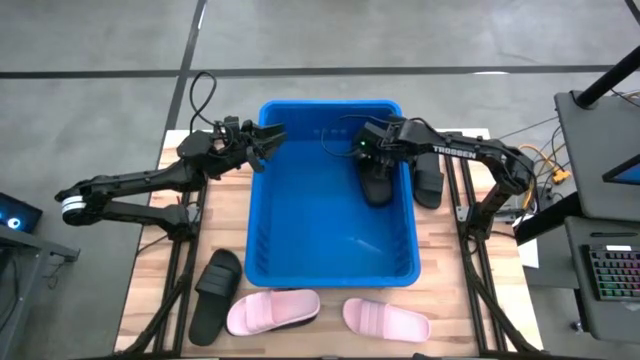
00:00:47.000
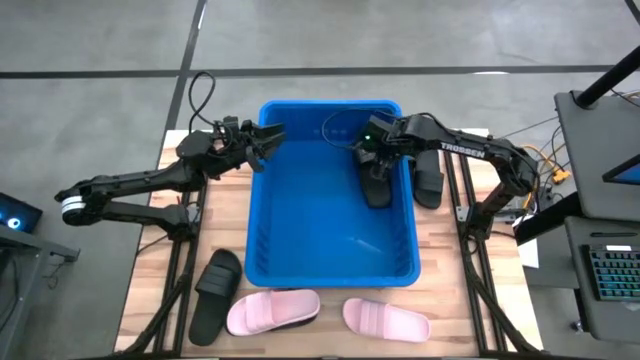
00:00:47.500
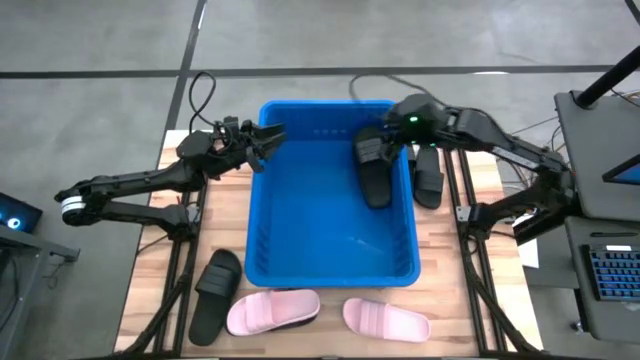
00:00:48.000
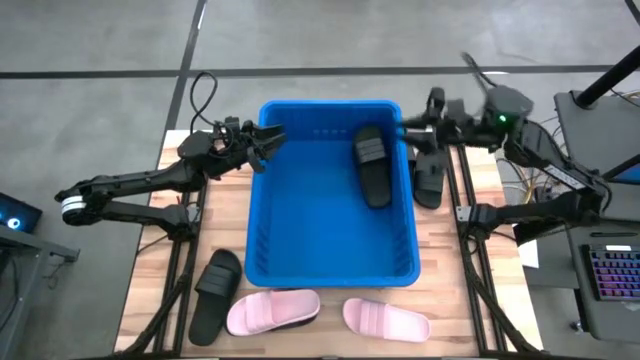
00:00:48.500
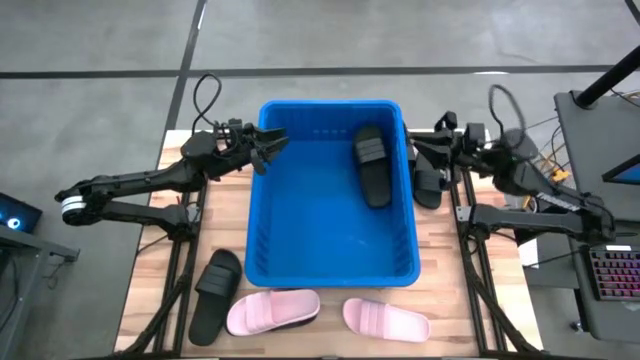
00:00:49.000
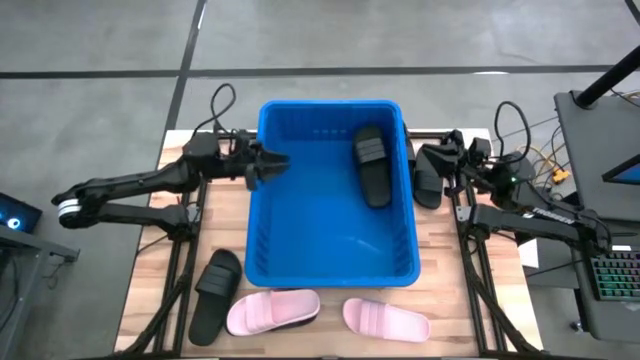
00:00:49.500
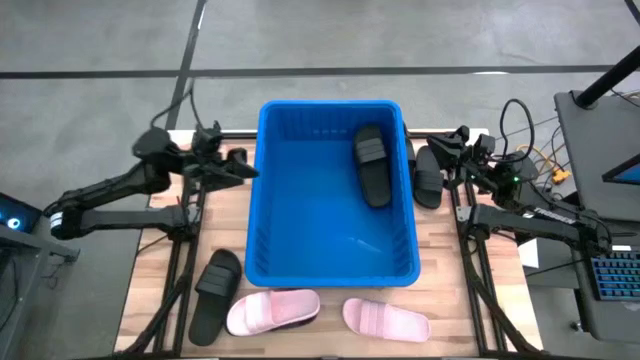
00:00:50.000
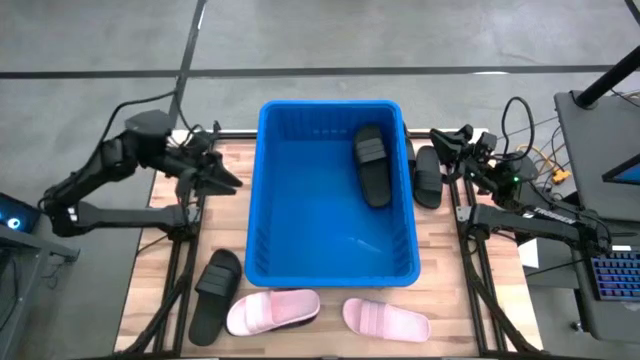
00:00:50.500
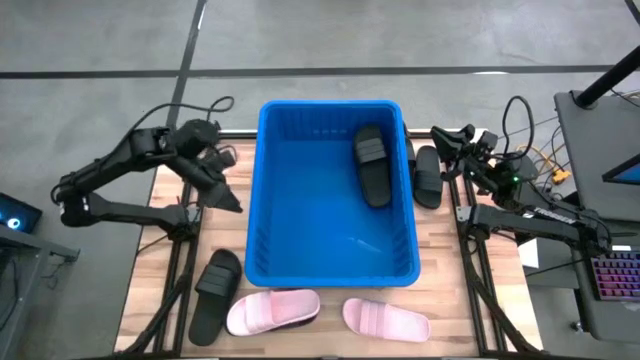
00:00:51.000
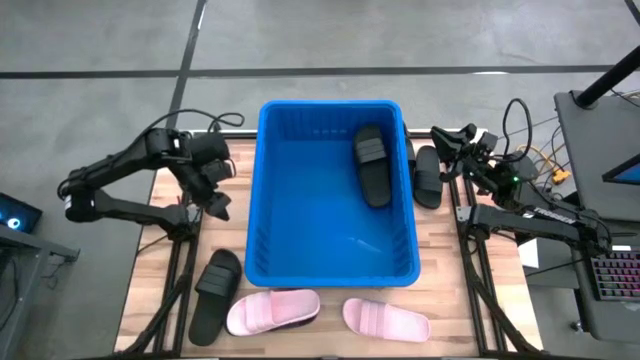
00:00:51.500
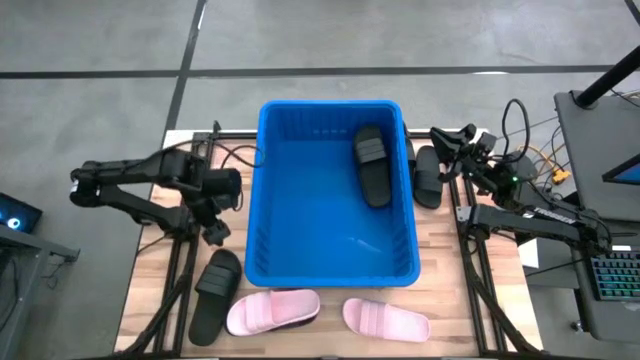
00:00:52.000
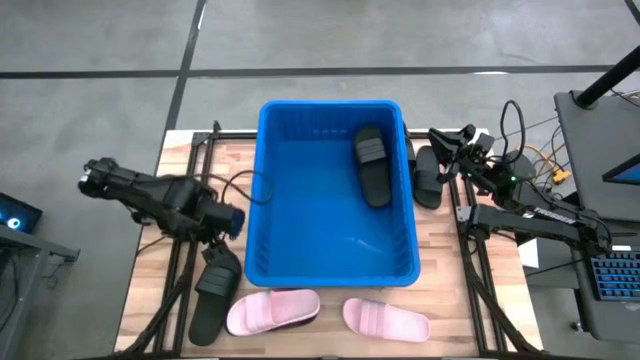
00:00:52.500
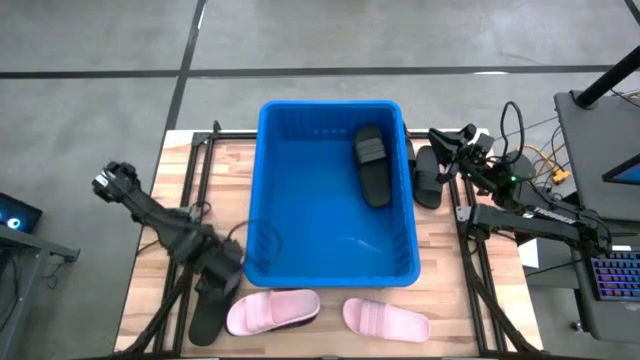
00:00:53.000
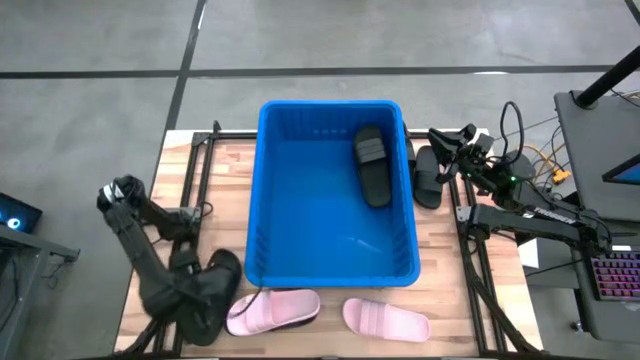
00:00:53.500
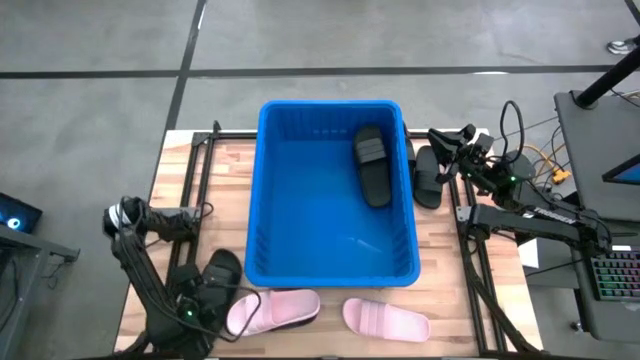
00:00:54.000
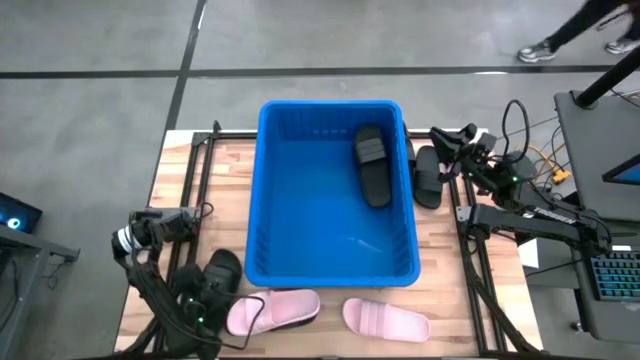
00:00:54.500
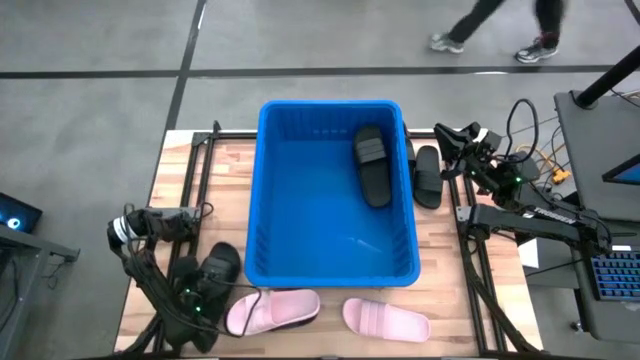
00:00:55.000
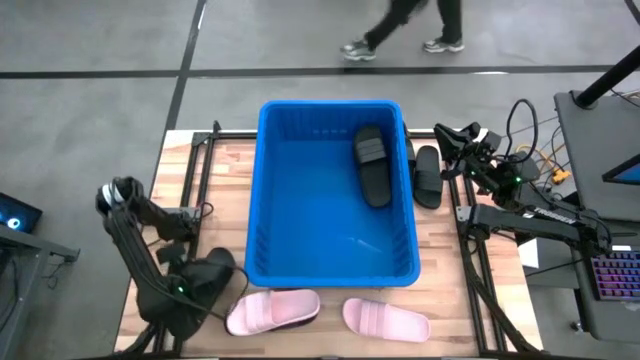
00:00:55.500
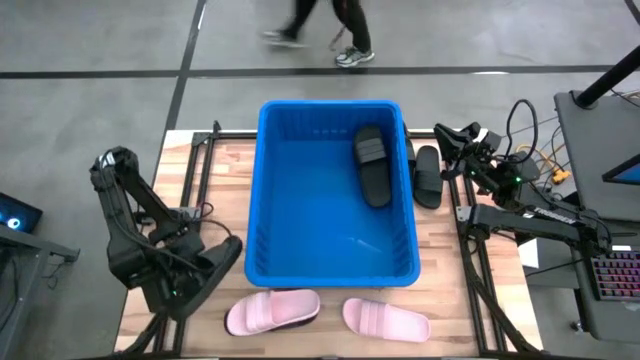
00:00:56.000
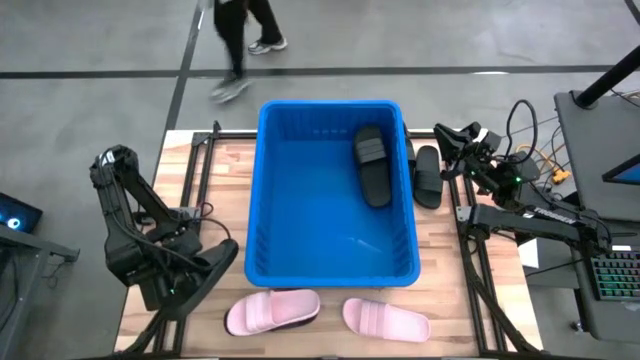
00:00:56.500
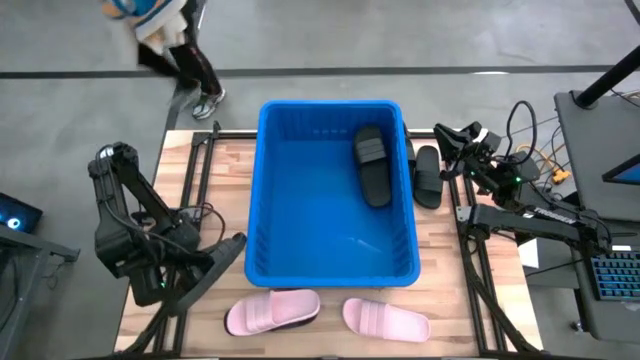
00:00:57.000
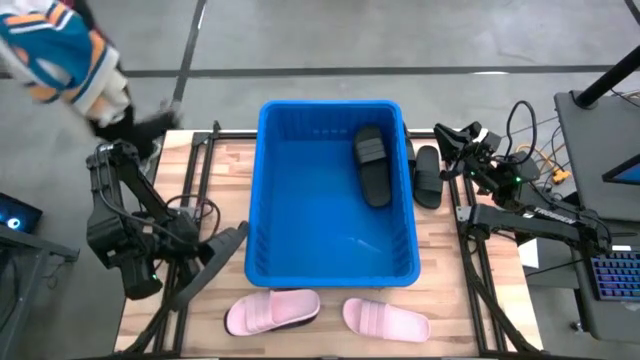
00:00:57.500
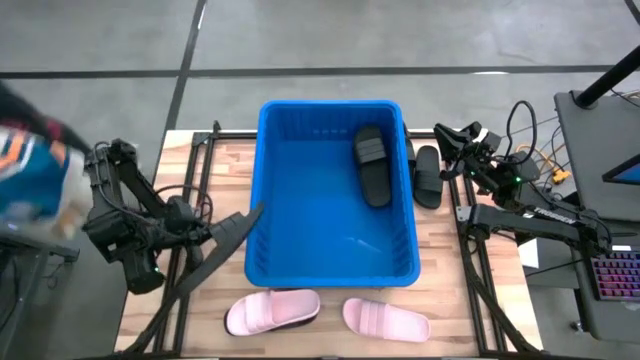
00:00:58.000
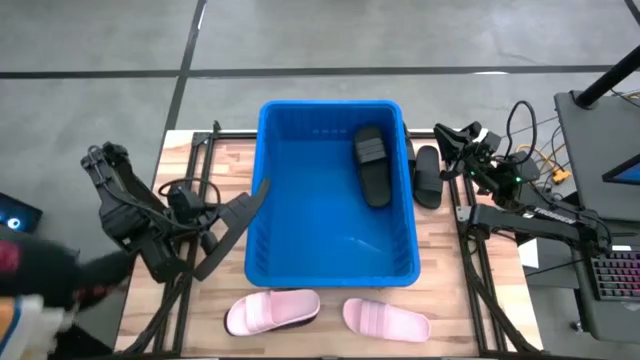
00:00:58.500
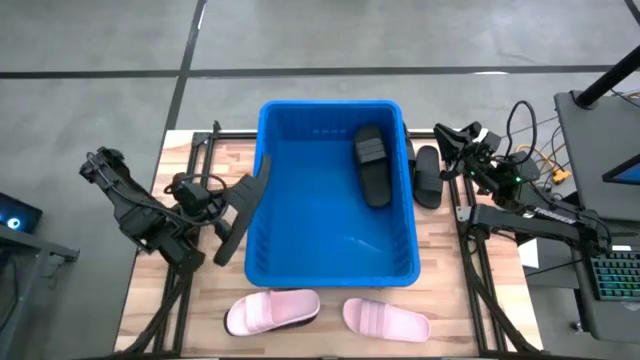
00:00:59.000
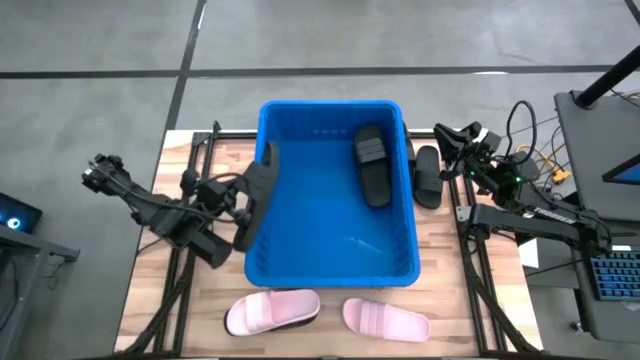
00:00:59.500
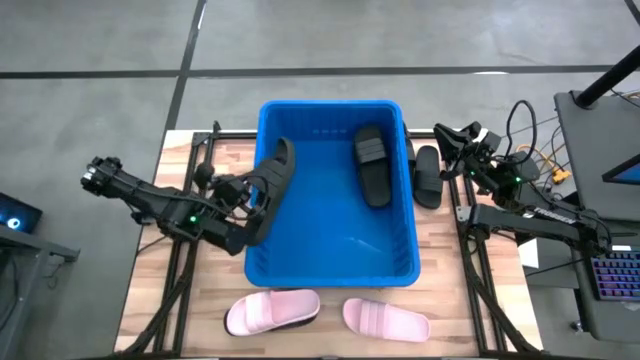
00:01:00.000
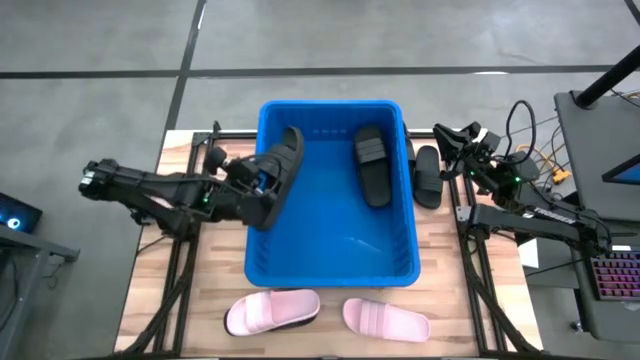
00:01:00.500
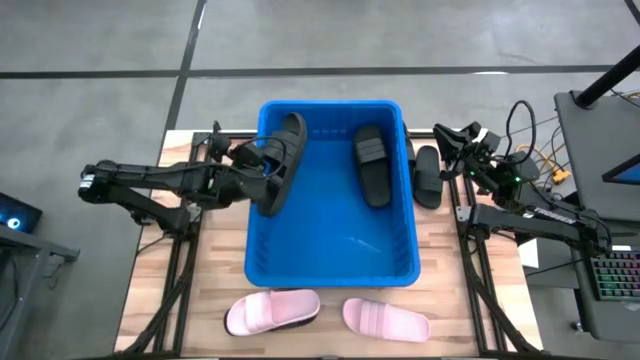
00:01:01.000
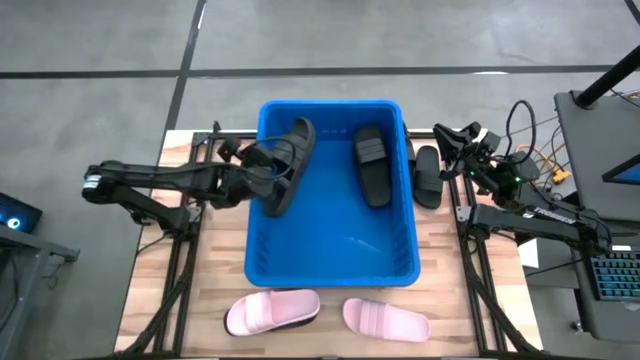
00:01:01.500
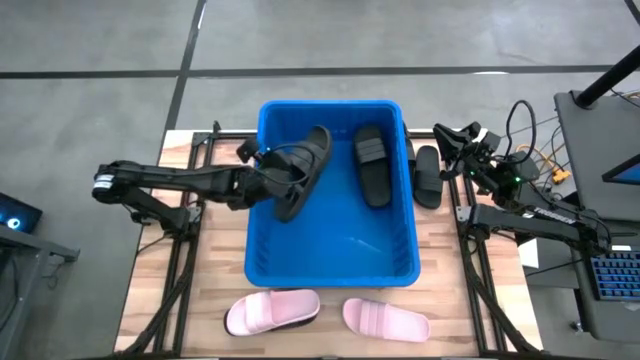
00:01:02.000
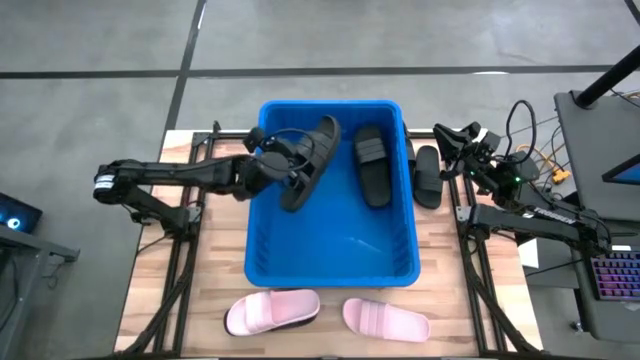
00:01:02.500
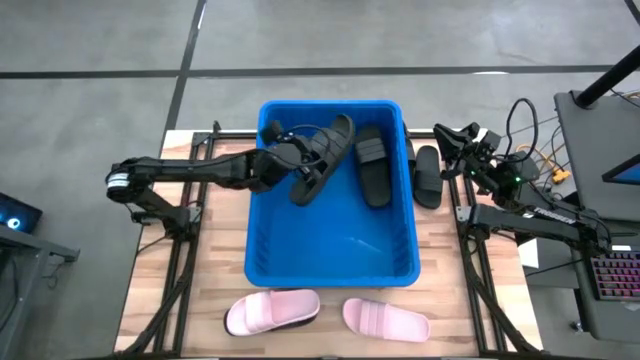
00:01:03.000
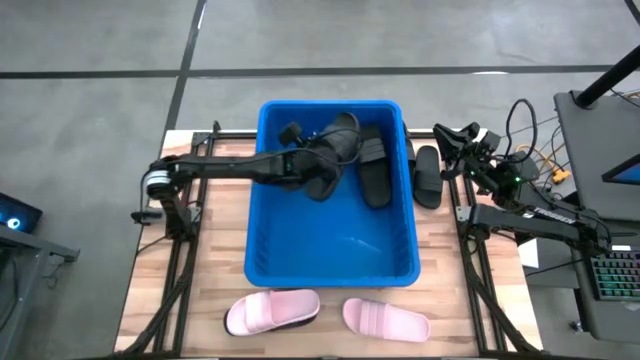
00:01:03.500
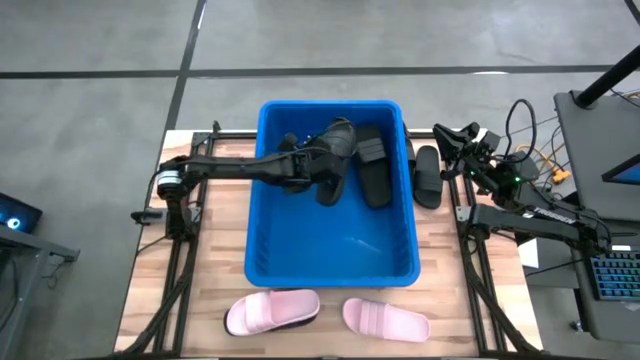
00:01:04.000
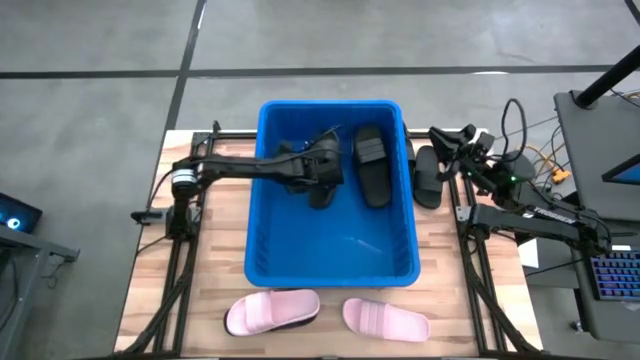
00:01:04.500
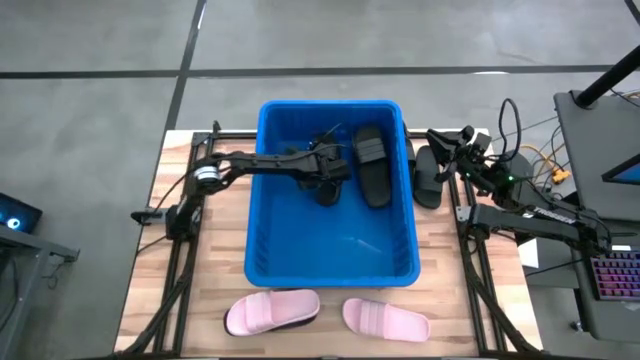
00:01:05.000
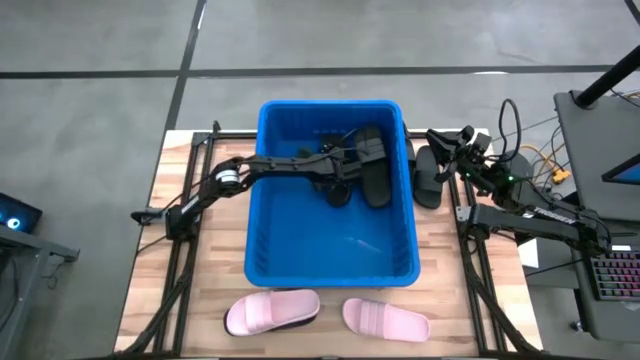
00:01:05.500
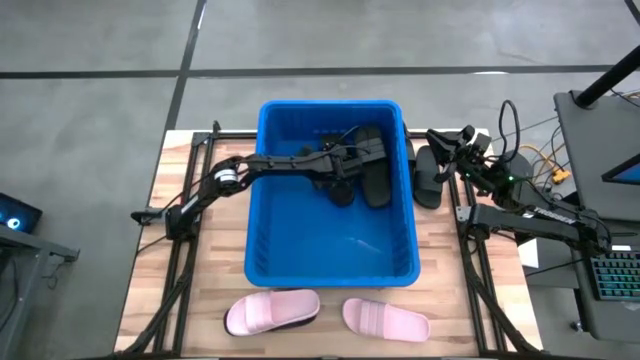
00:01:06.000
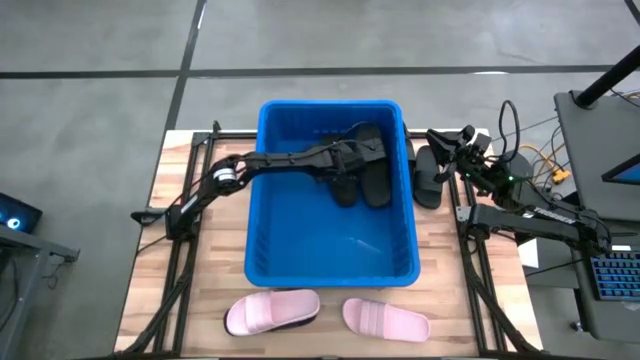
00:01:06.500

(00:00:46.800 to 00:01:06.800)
Task: Pick and place slides into bin
Put the black slides into the blue organizer bin
